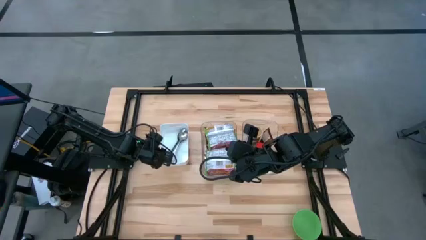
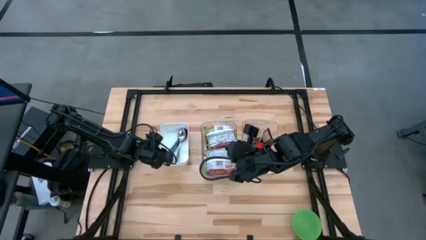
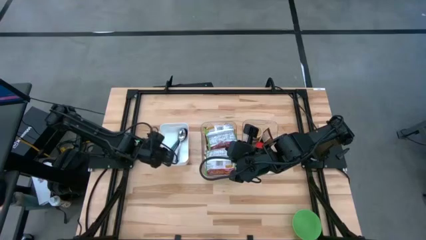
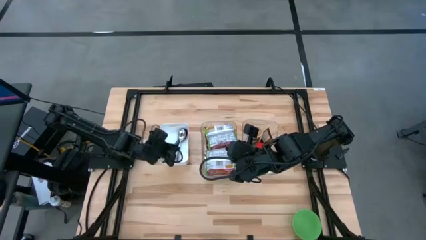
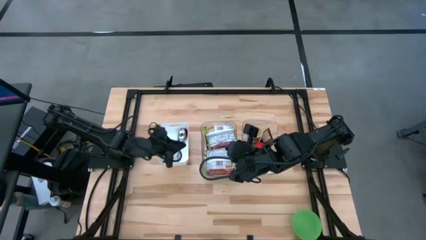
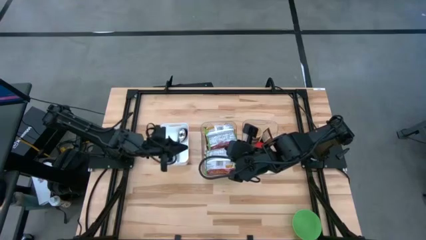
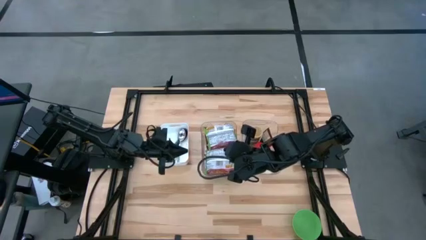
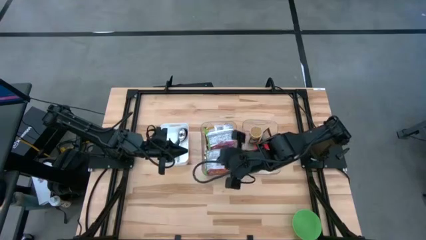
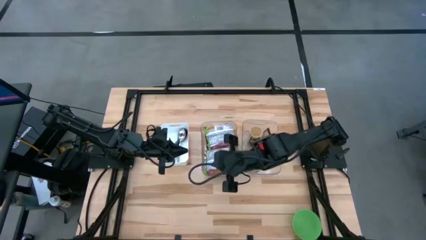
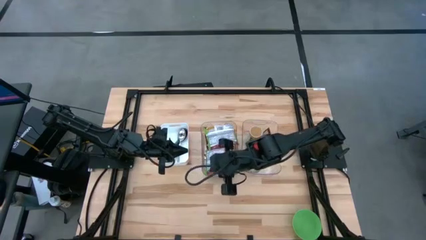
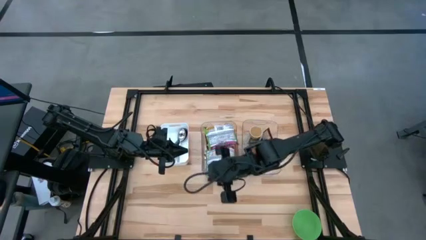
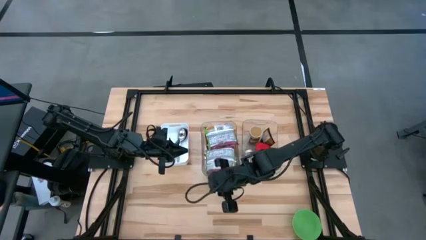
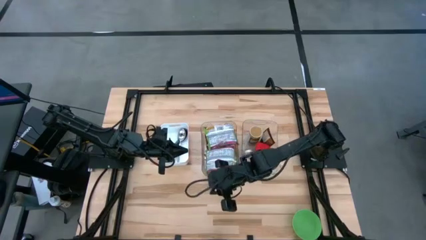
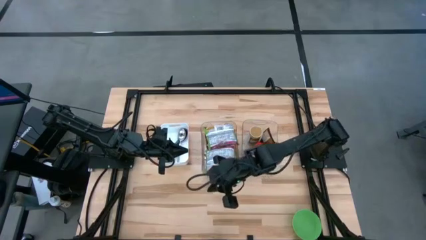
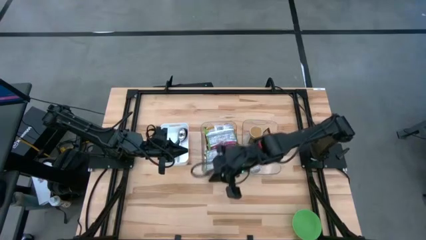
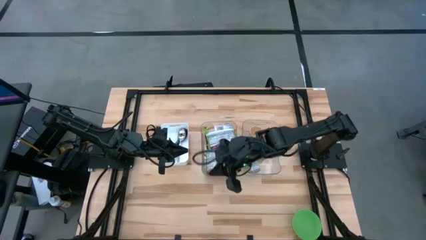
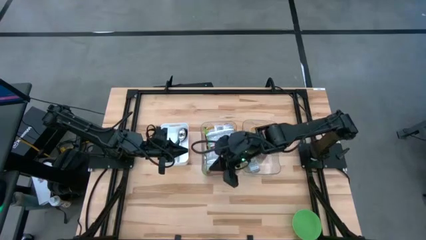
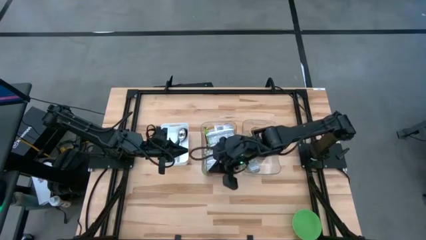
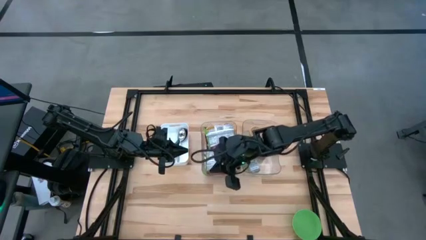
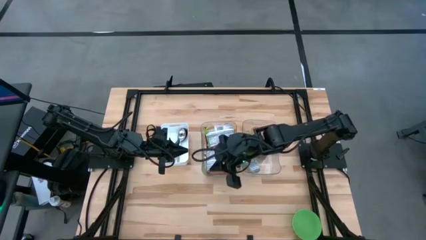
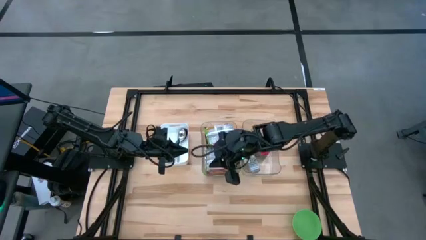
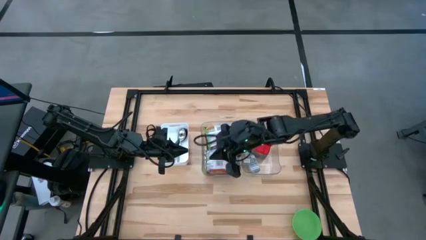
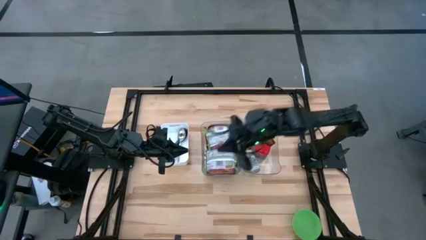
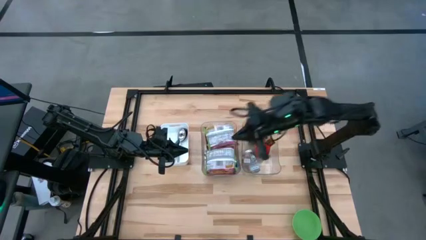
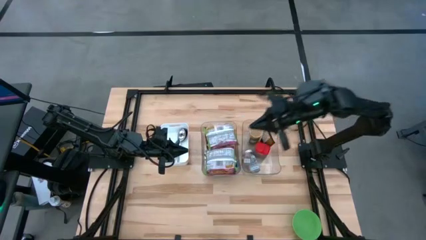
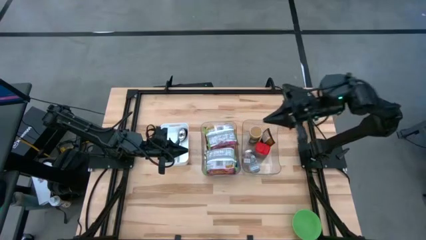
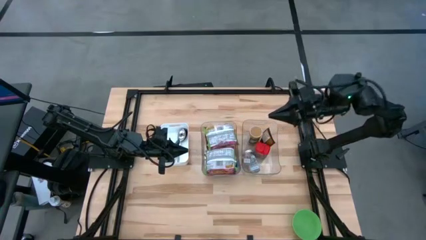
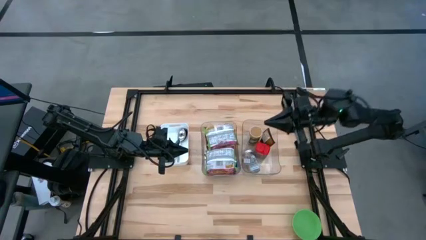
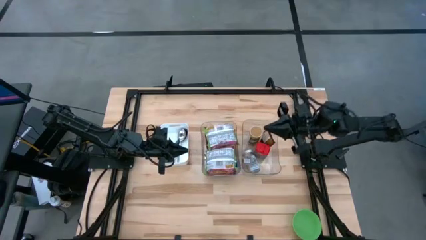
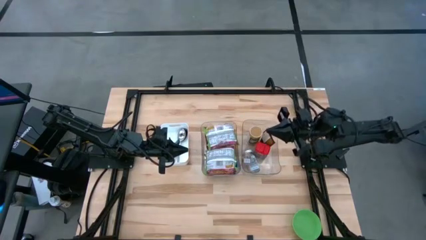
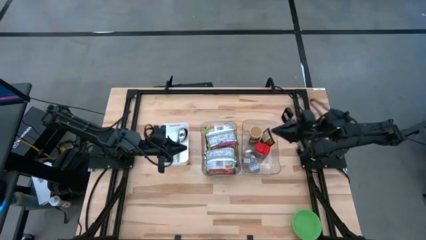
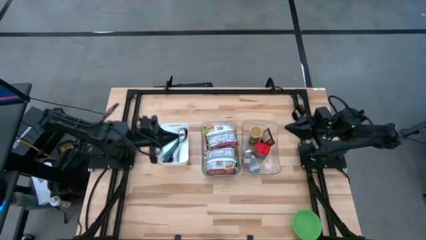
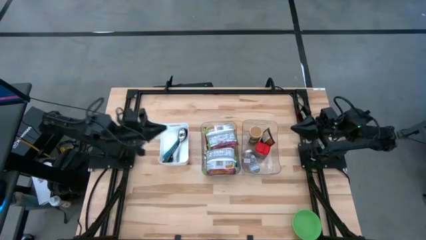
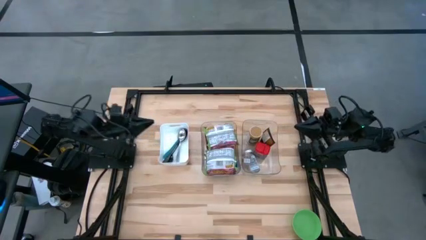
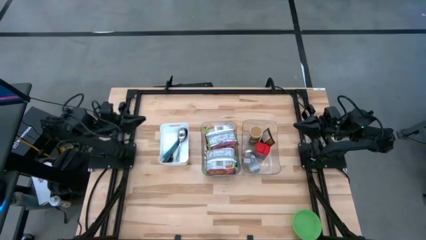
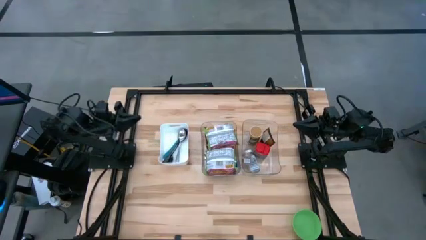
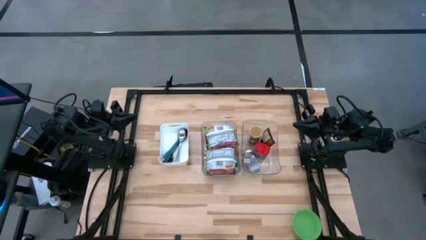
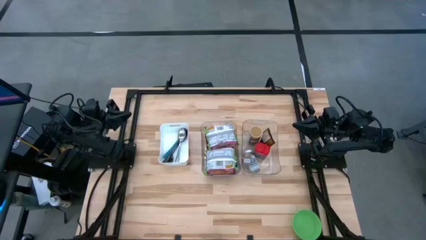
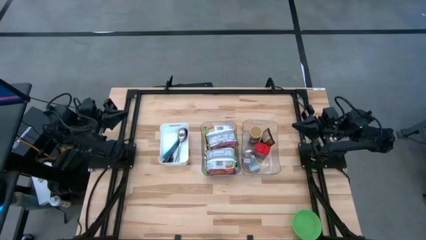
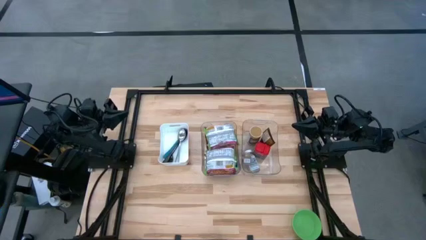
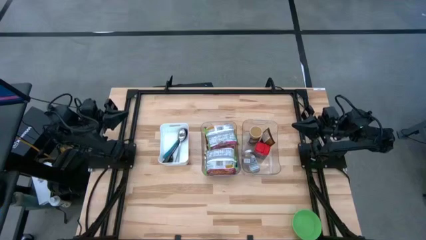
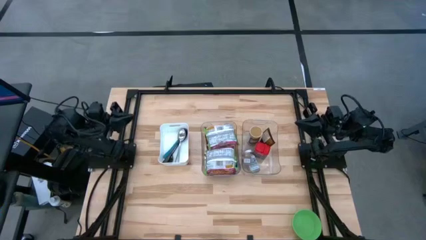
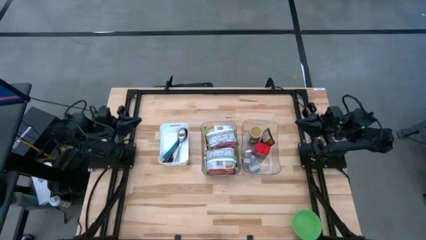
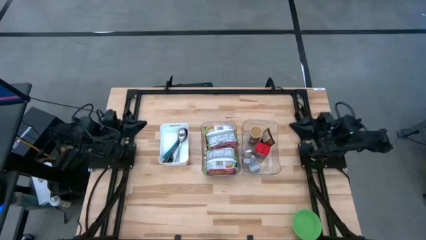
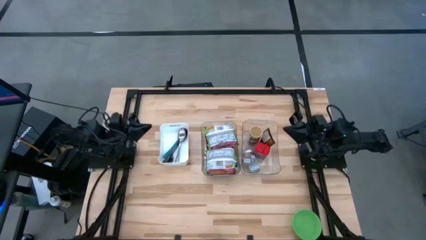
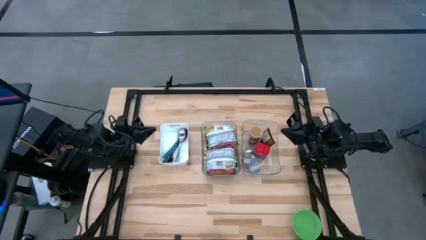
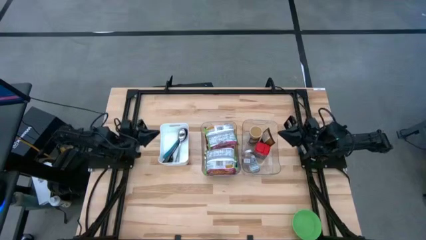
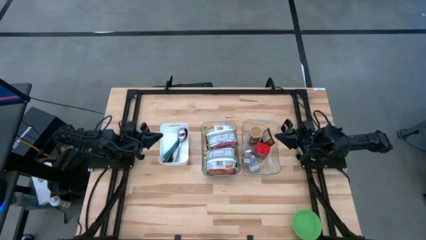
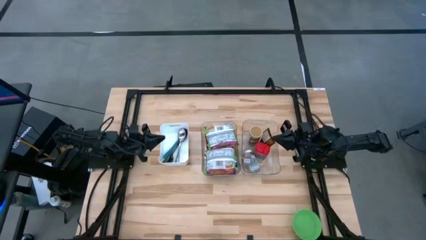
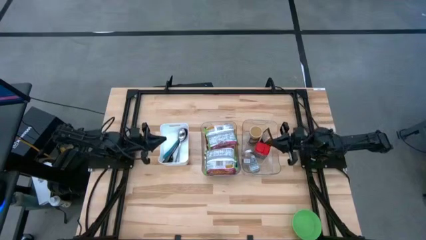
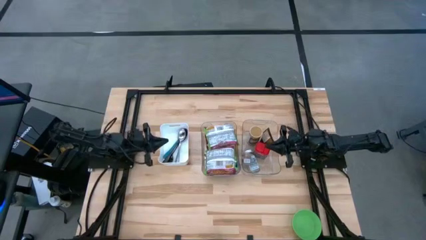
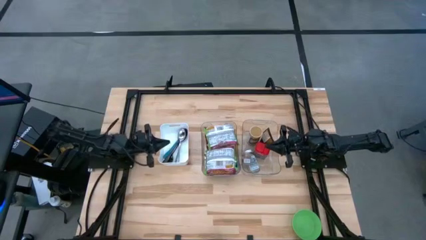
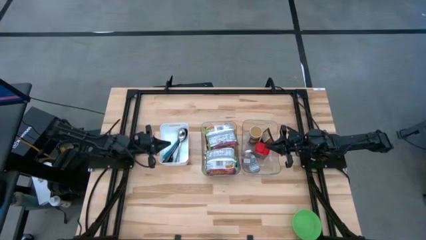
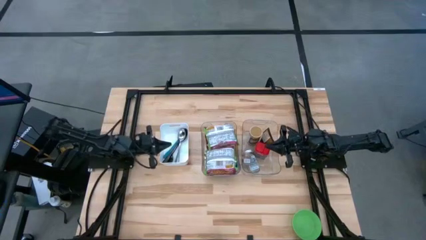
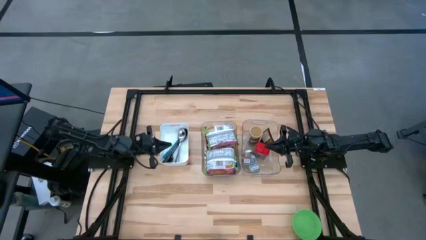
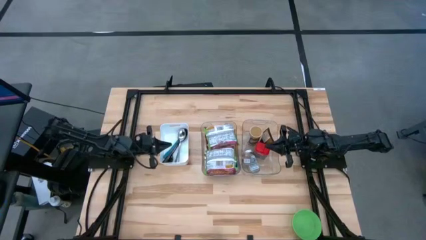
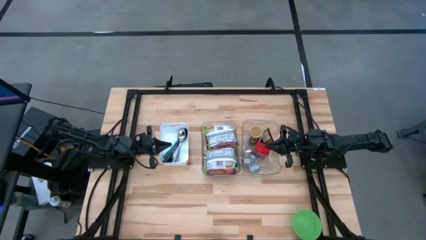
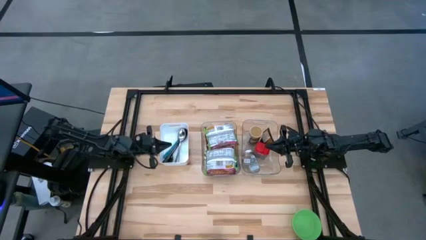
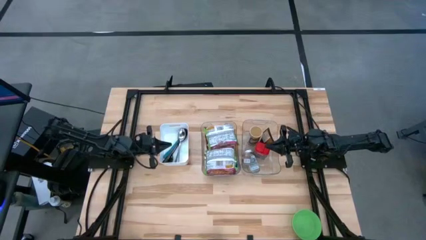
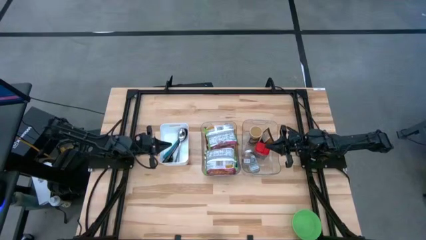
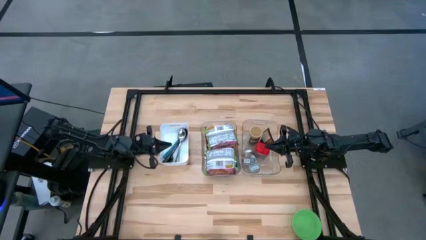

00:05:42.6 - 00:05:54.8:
Task: Pick & Place Food Item
Return to Home Position
